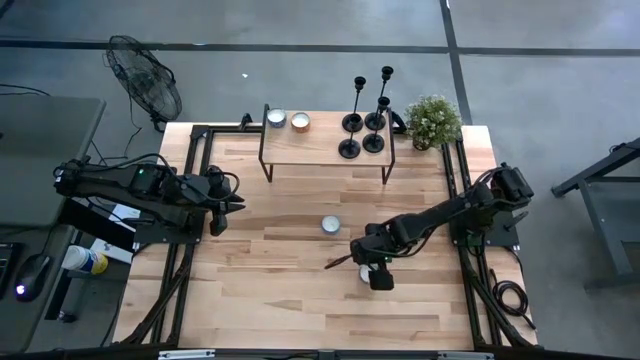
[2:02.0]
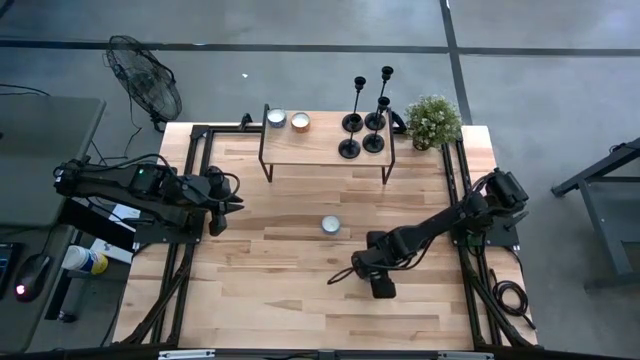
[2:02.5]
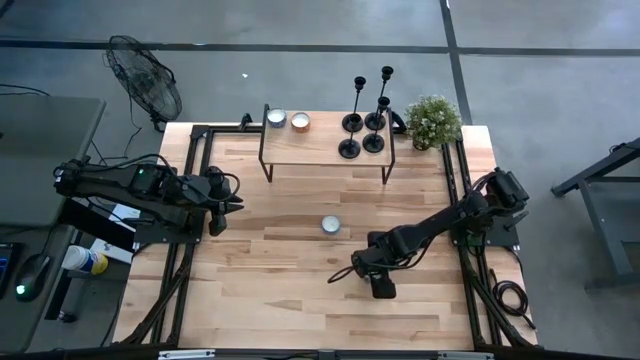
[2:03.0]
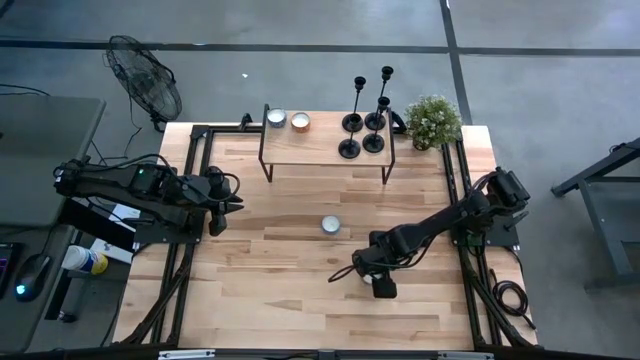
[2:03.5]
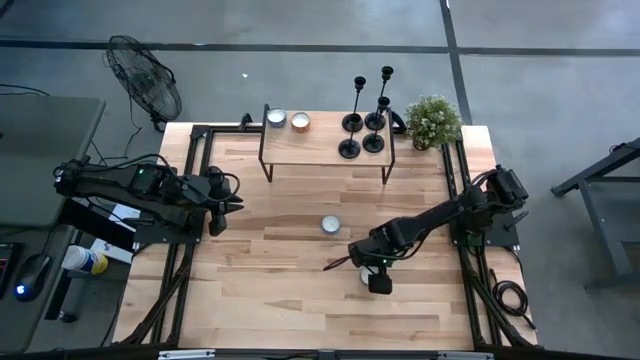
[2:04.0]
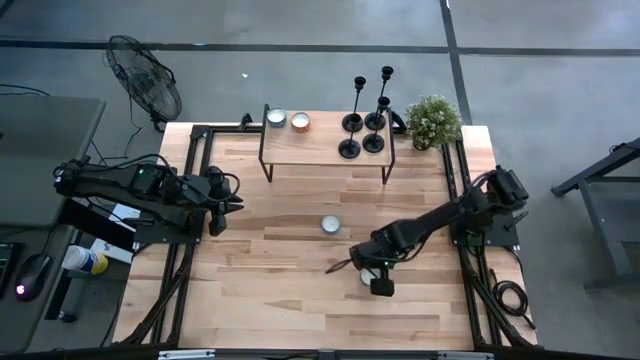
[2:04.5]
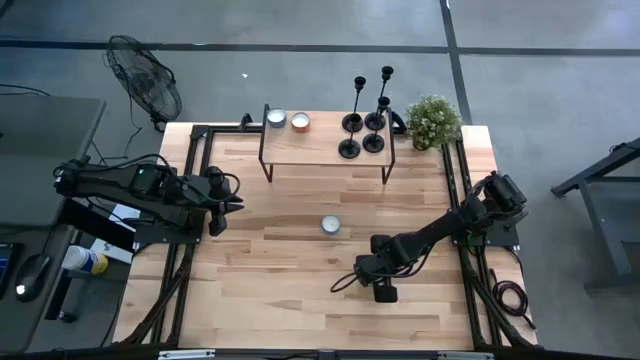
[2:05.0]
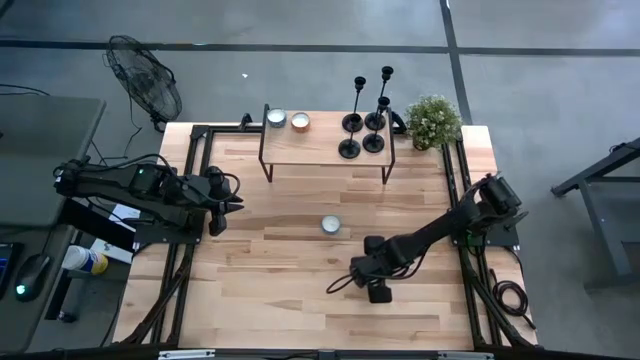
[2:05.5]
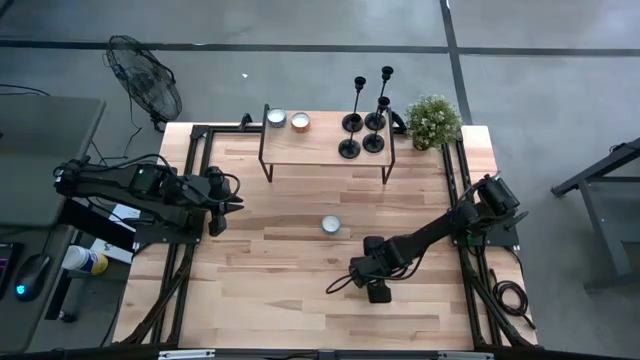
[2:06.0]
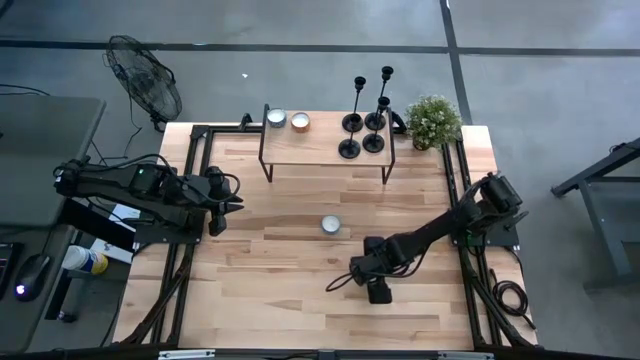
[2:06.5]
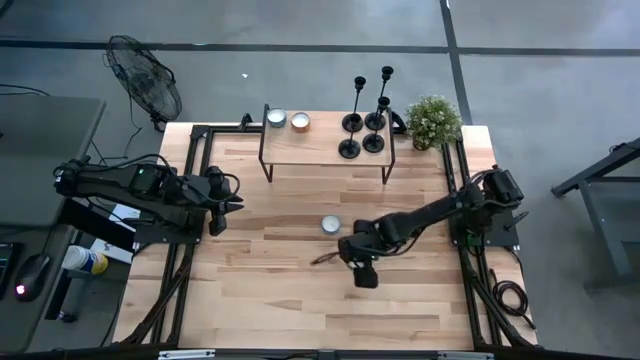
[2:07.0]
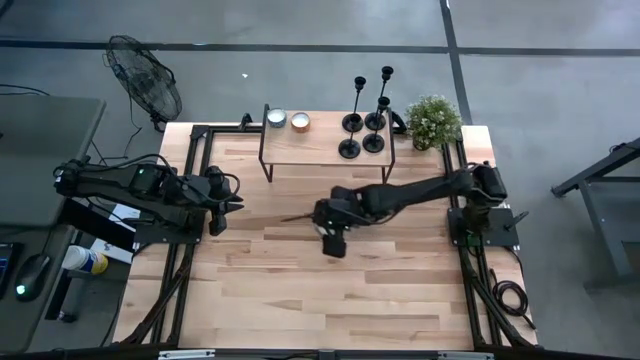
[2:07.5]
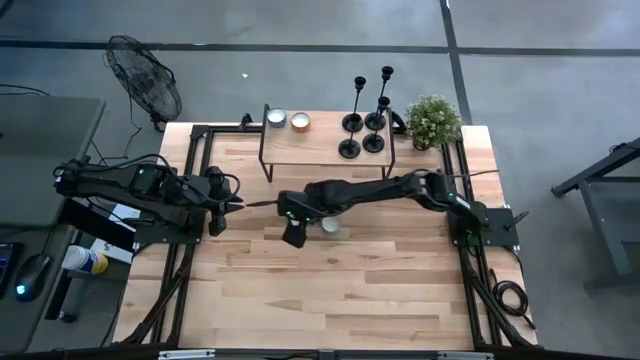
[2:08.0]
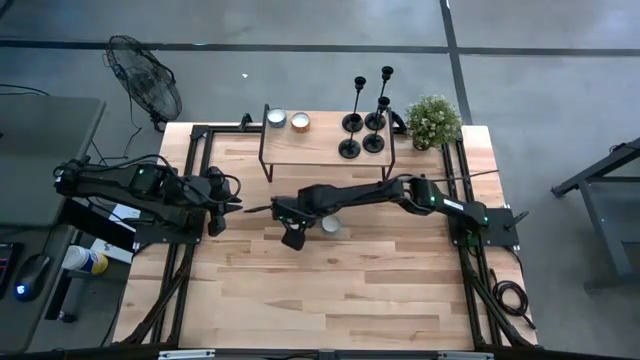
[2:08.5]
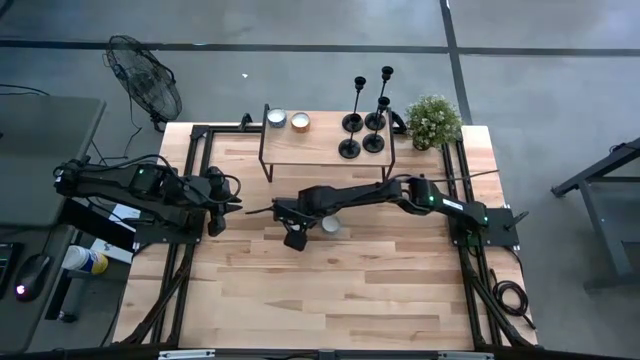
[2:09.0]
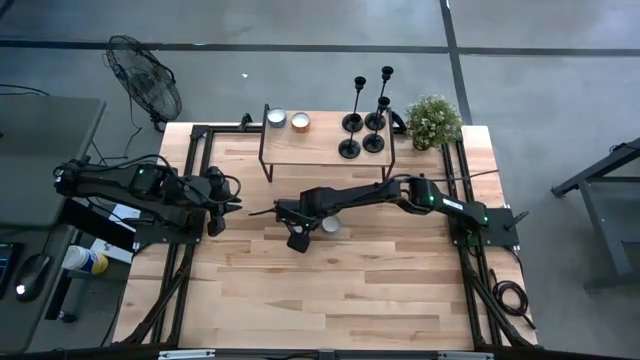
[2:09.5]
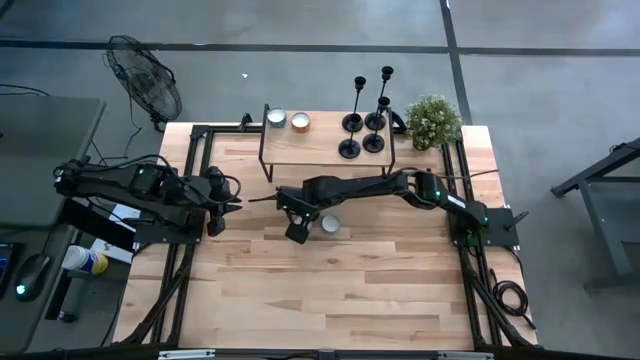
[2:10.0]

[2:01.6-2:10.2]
Task: Pick & Place candle stick holders
Move the brown scented candle to the center of the table

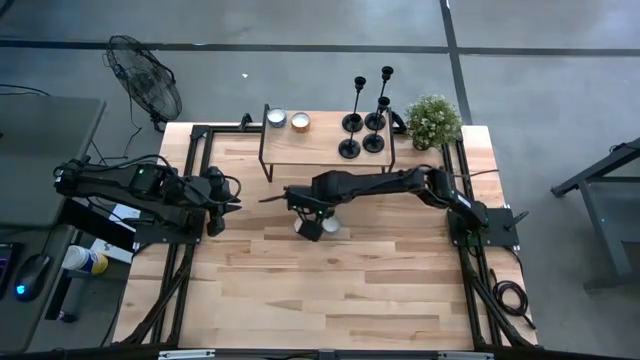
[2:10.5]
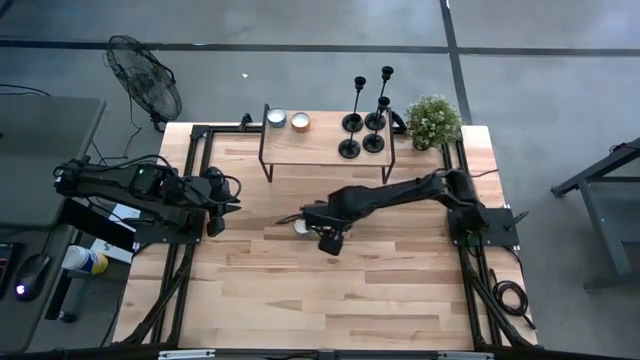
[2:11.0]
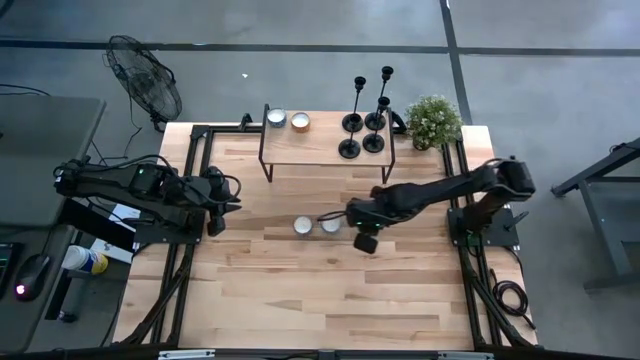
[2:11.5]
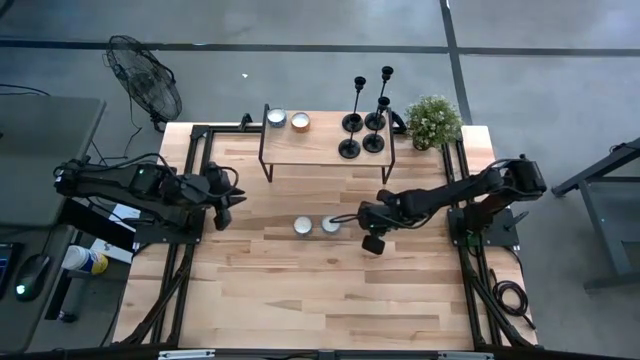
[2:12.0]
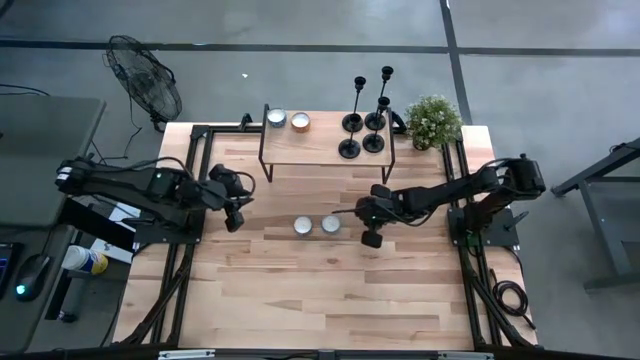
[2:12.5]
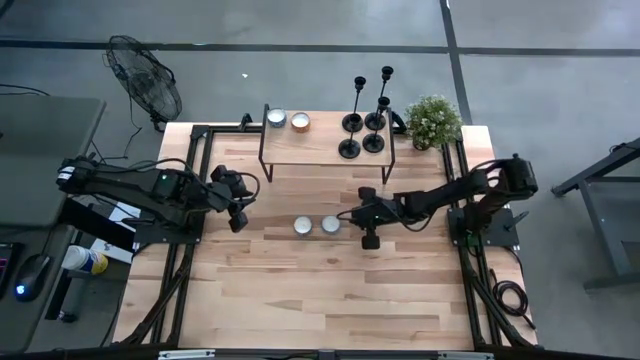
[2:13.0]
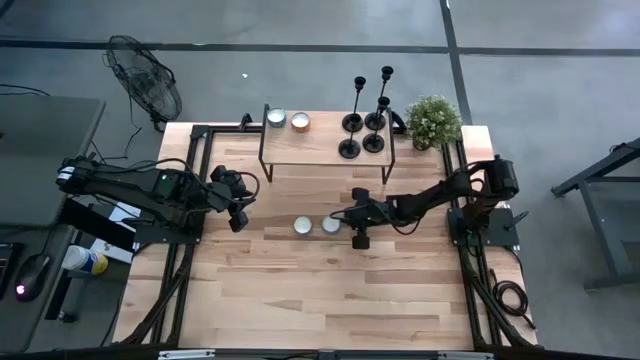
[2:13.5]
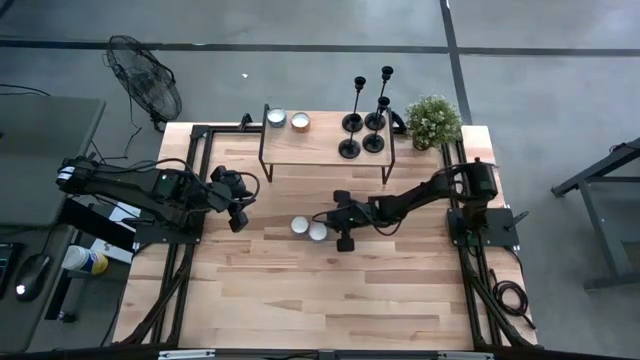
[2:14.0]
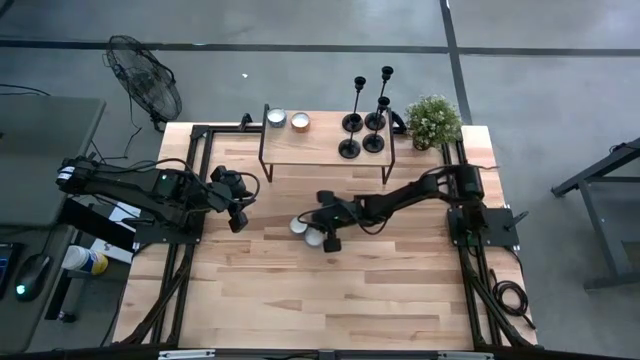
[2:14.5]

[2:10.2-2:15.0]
Adjust the colored scented candles

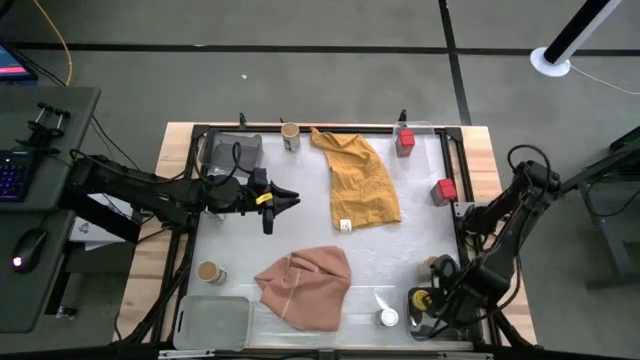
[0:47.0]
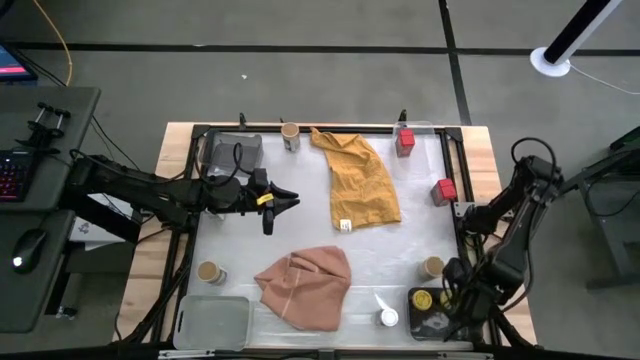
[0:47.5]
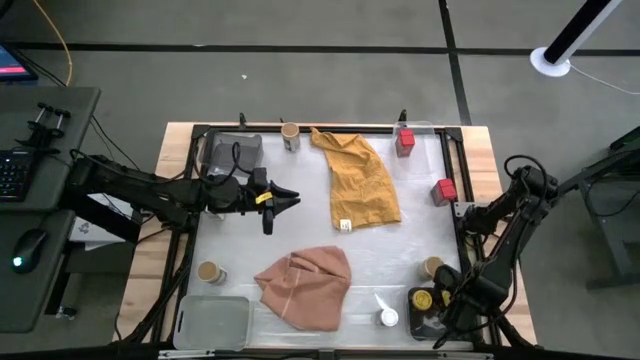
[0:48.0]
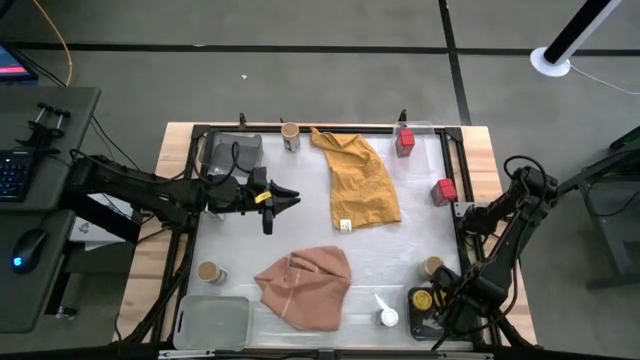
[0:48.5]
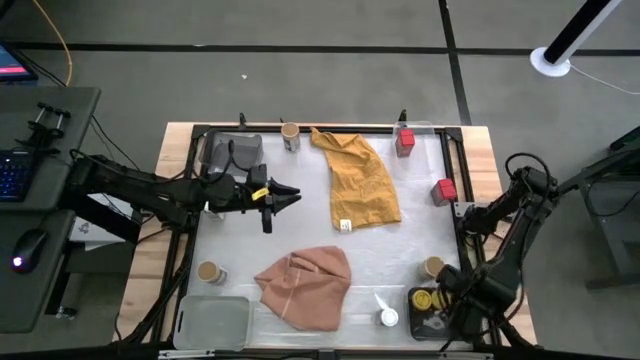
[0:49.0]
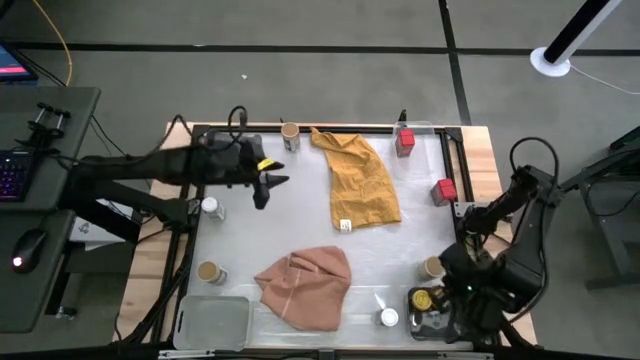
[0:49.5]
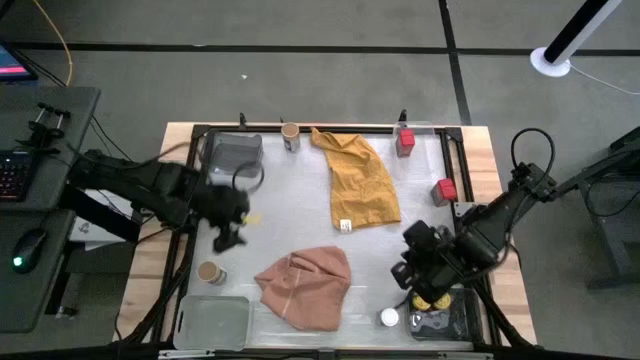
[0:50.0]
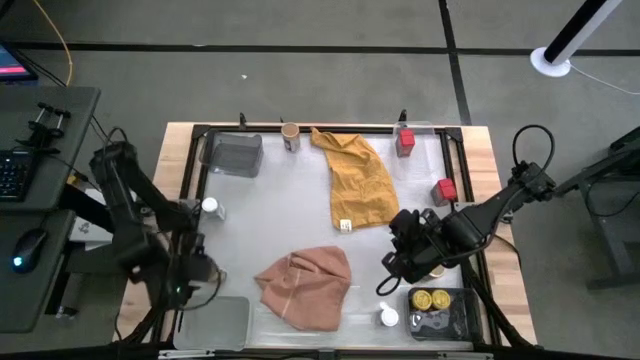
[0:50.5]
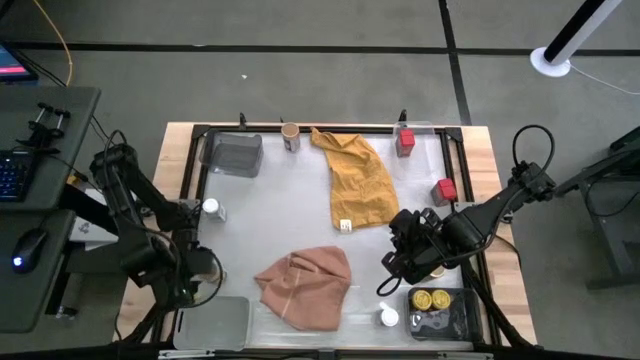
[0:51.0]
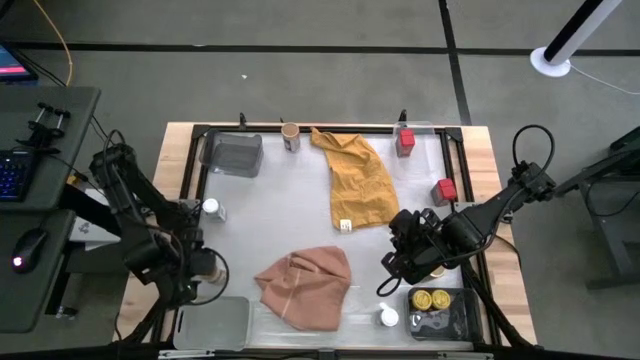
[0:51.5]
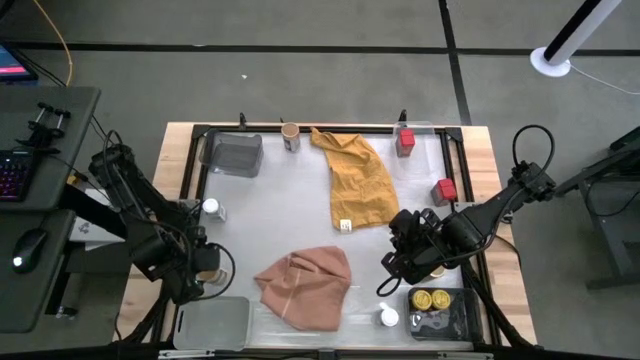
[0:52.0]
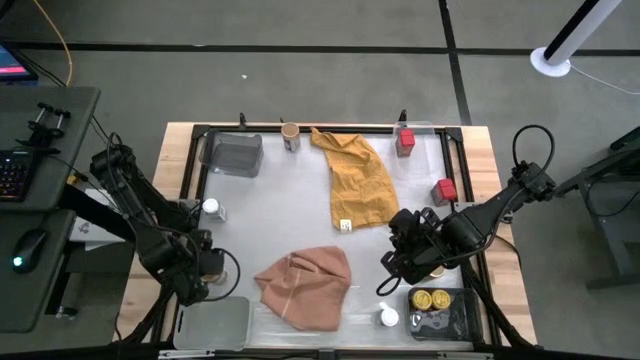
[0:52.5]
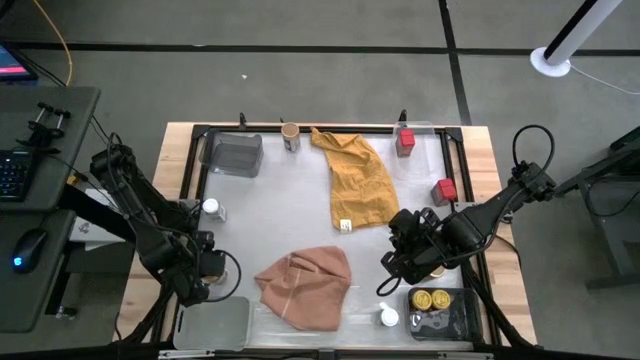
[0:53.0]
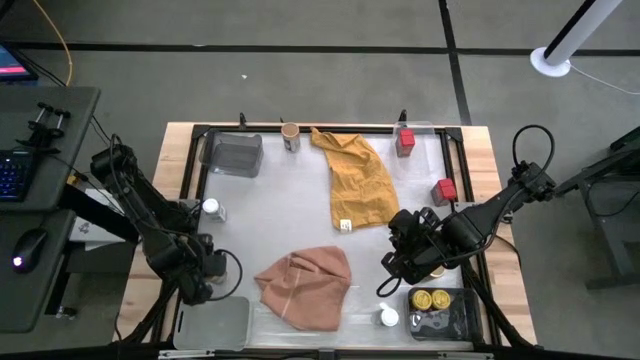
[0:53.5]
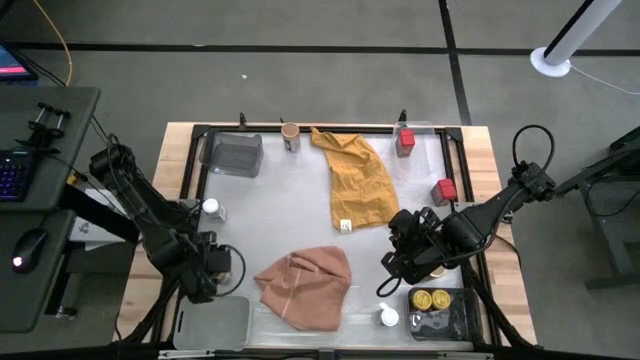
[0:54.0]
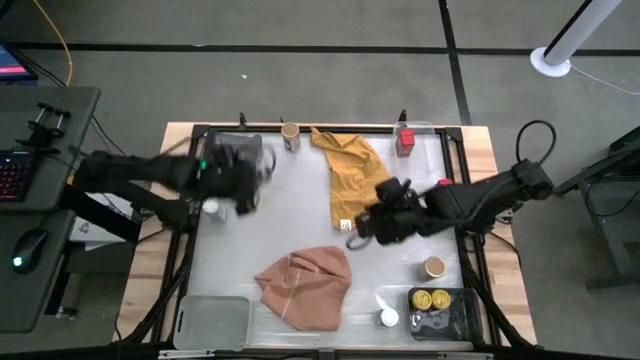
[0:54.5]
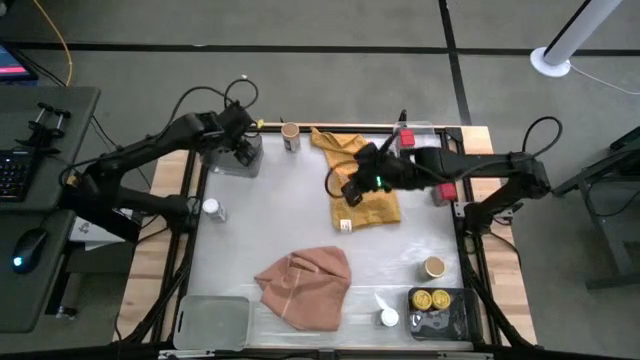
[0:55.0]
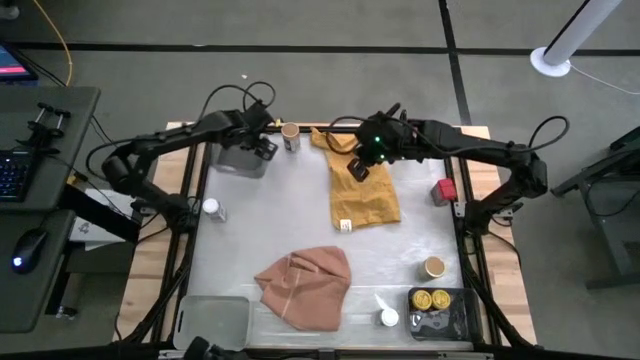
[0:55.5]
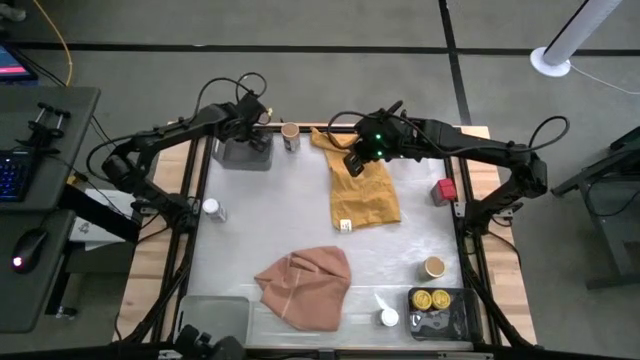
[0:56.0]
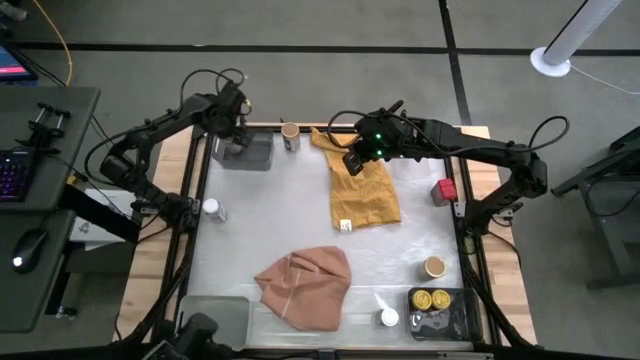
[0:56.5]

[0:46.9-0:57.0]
Task: Sort spices by type
Put the bottom left brown seasoning bottle into the top left black bin
